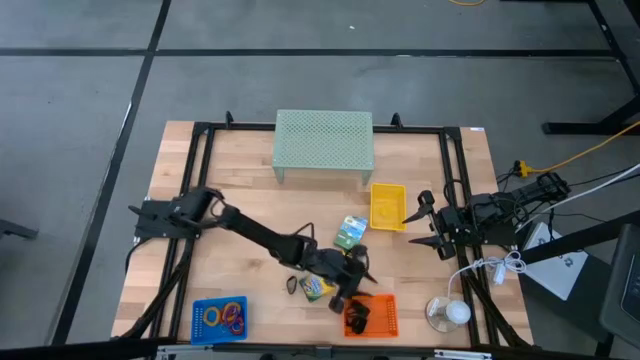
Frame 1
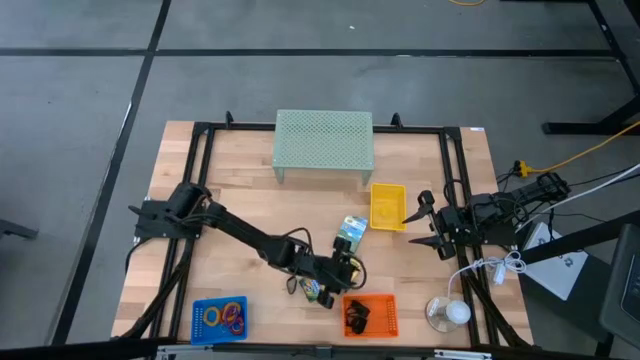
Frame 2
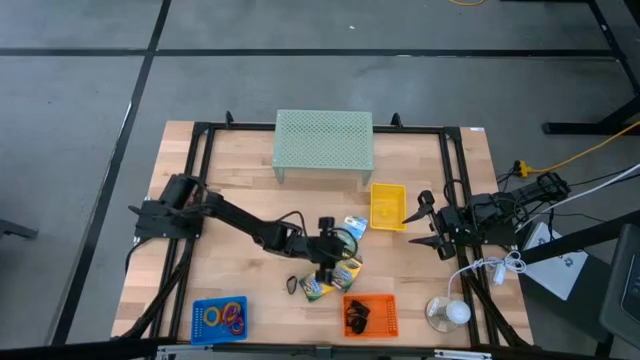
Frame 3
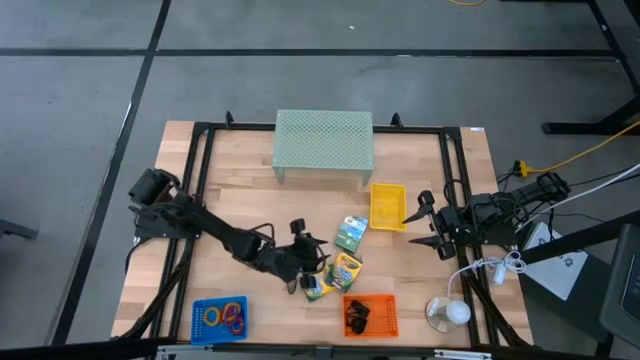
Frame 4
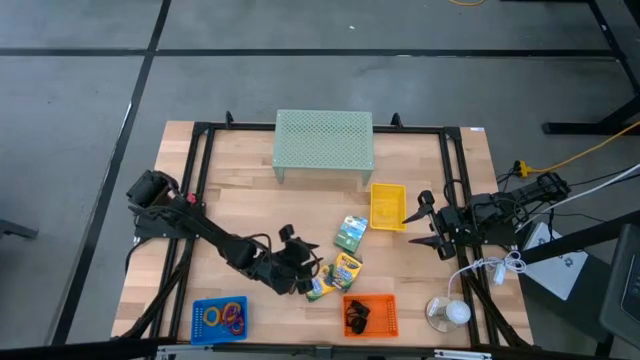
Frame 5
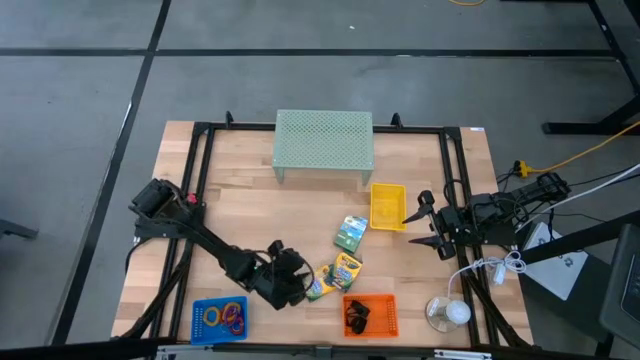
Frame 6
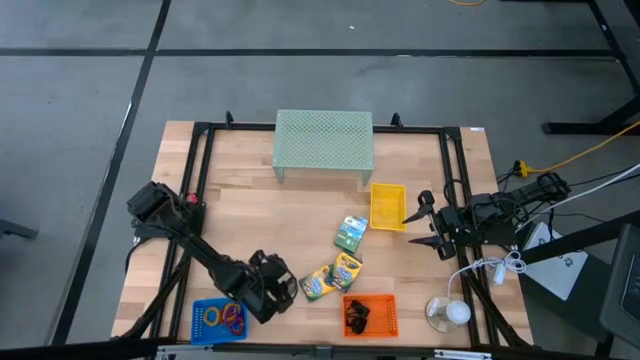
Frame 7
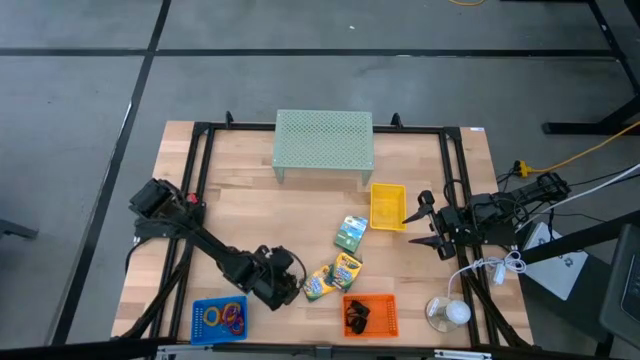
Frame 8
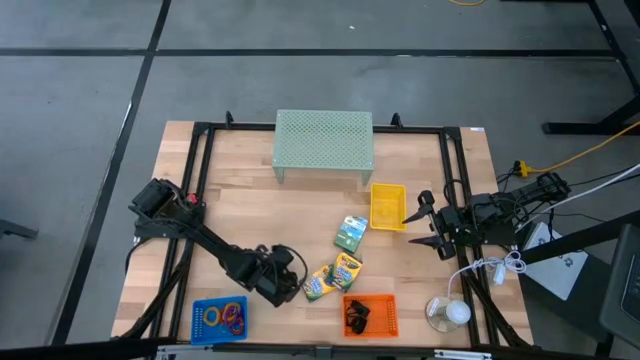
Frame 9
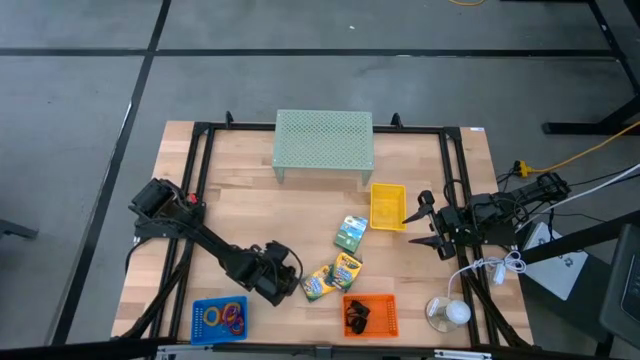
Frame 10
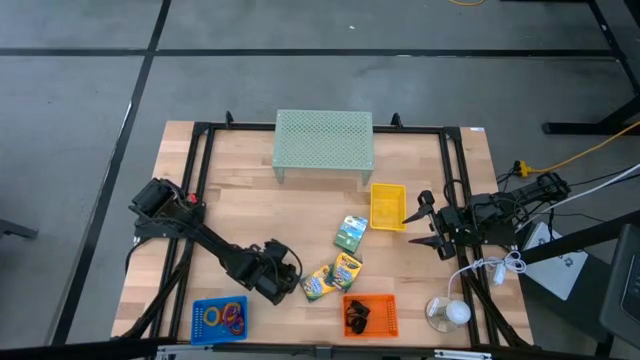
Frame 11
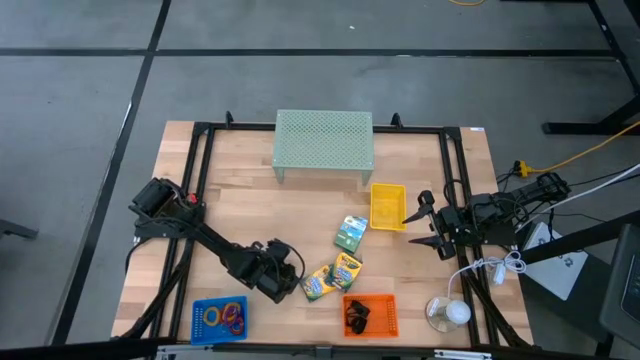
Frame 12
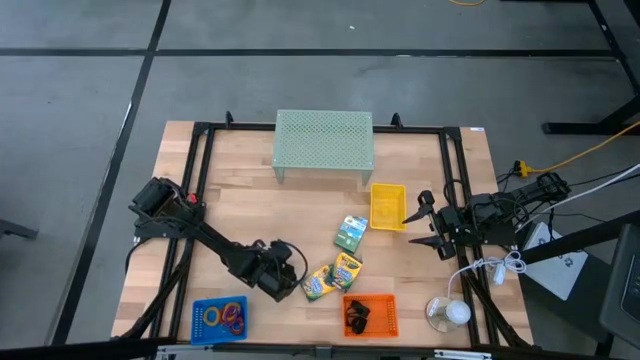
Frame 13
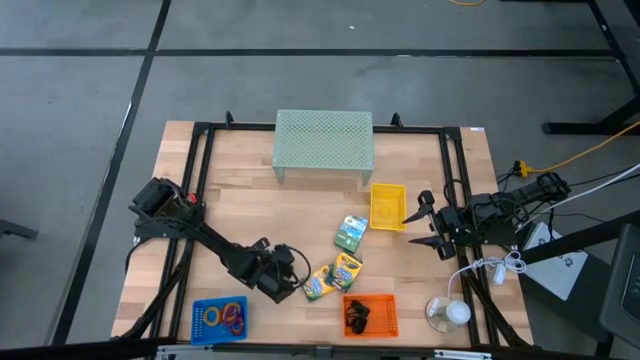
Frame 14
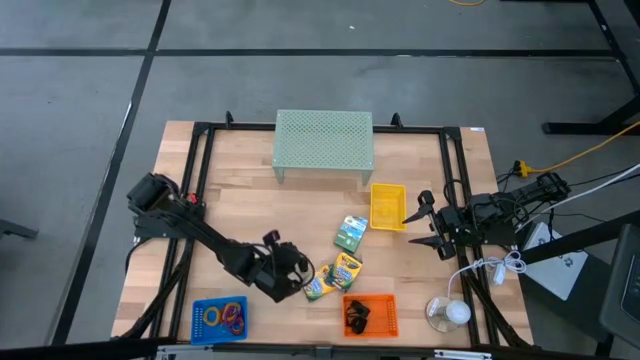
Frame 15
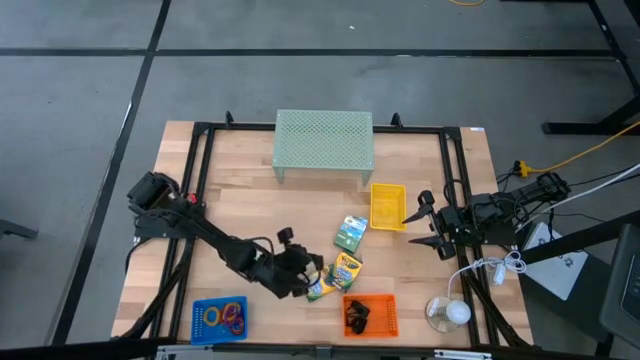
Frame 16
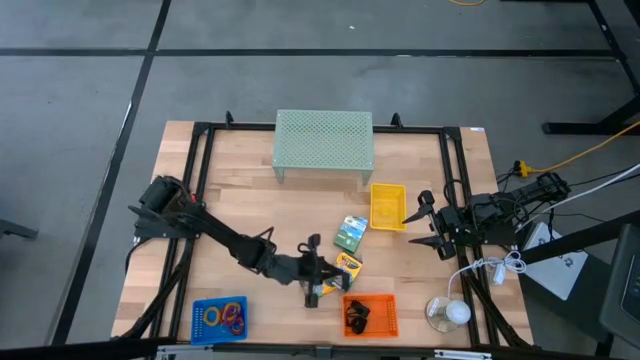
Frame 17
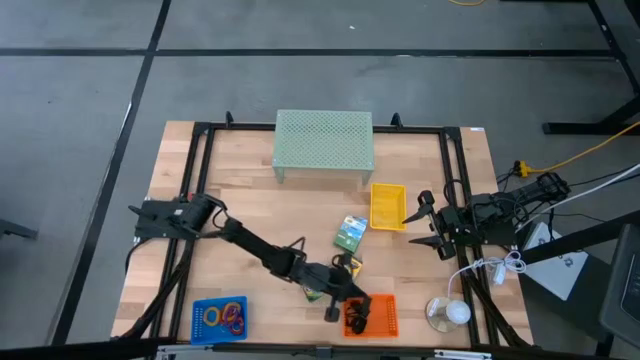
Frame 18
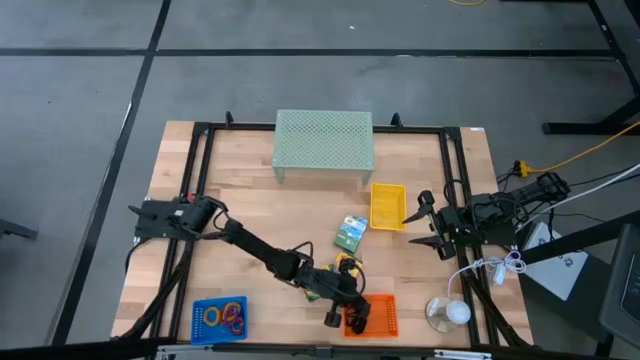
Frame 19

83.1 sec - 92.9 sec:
Task: Pick & Place Office Desk Supplies
Put the black rubber band into the orange bin

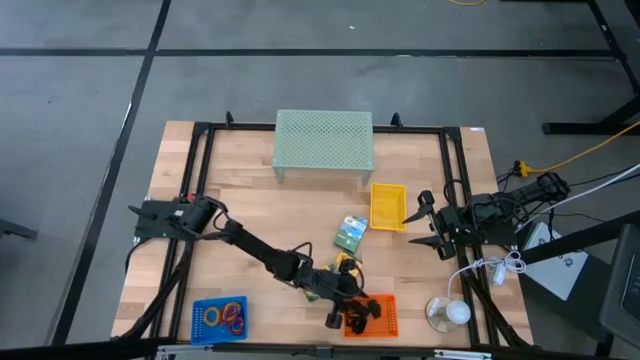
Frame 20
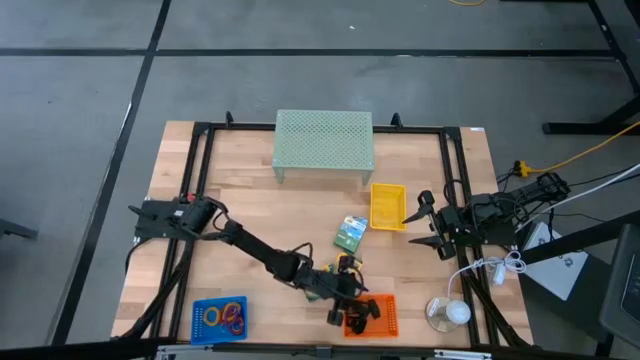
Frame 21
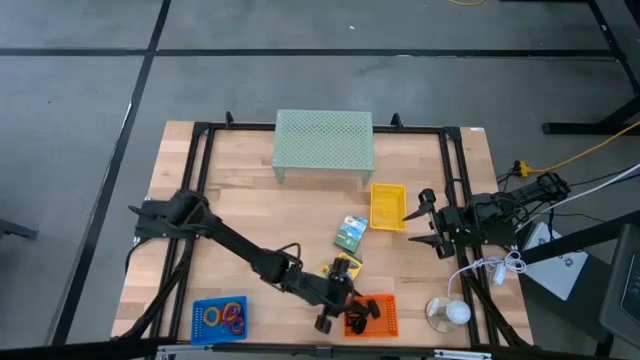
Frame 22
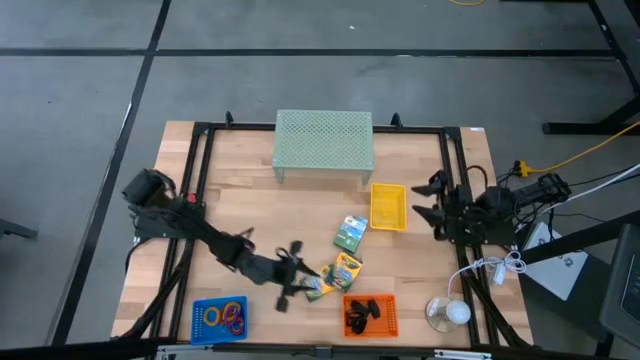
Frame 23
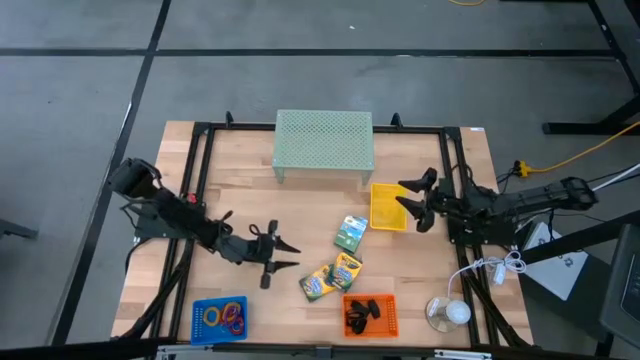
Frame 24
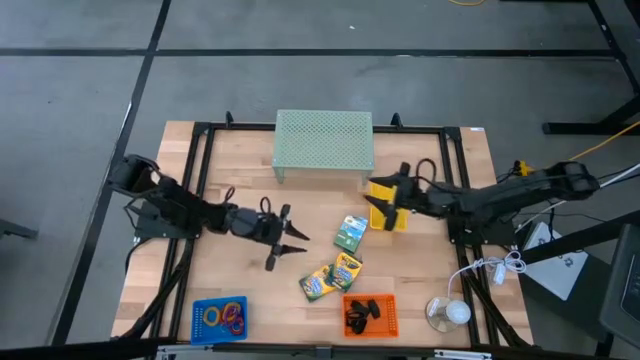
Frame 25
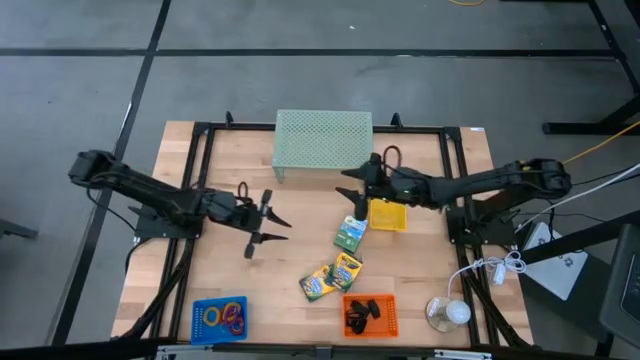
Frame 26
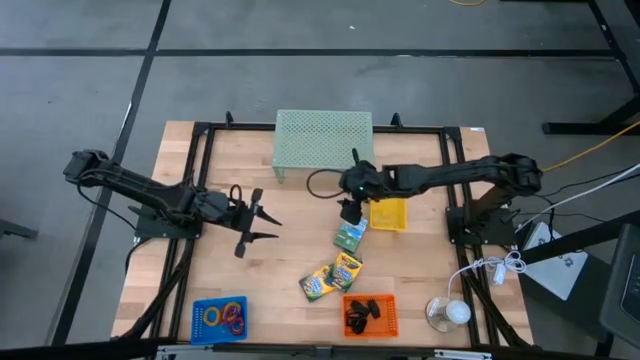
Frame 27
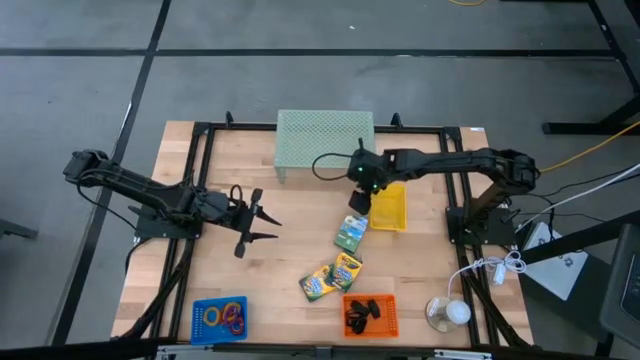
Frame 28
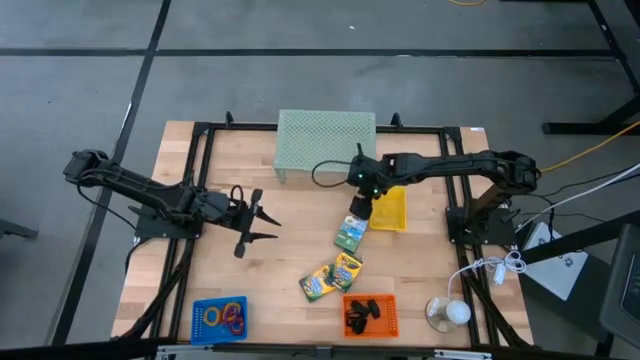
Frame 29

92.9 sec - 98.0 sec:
Put the box of crayons into the yellow bin

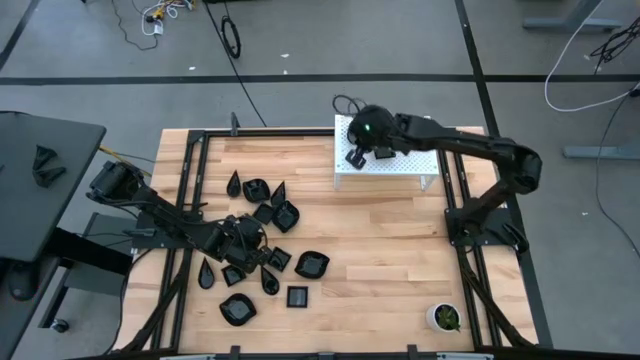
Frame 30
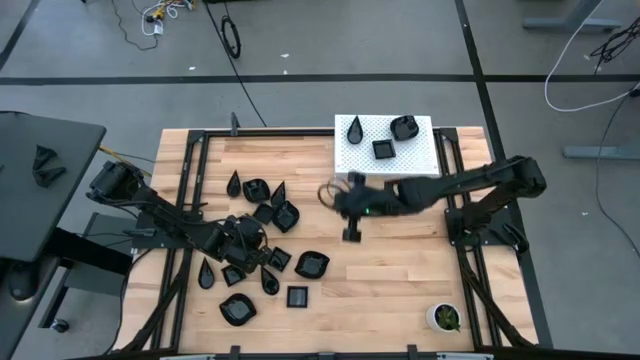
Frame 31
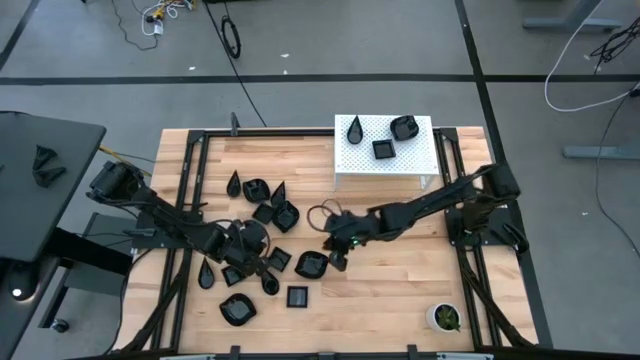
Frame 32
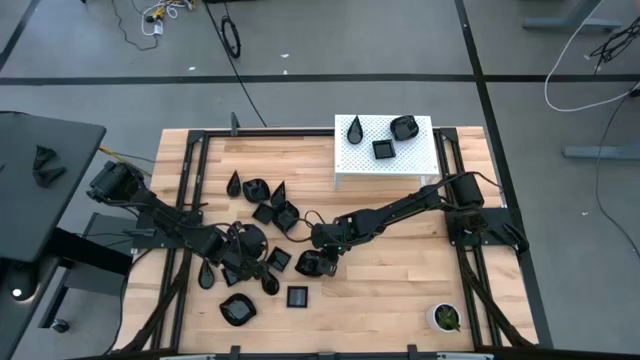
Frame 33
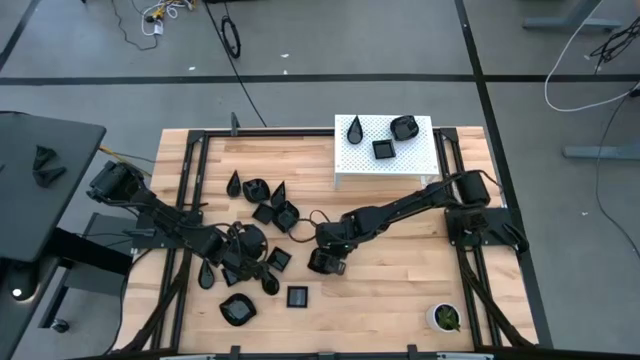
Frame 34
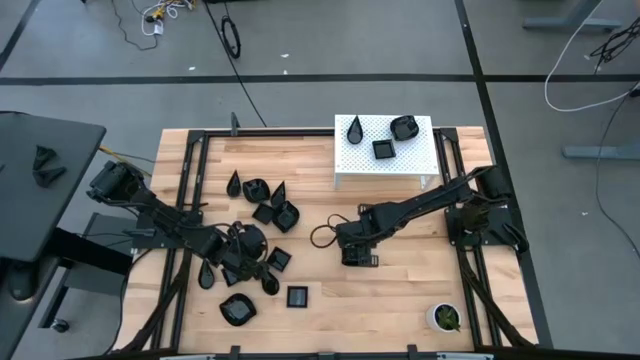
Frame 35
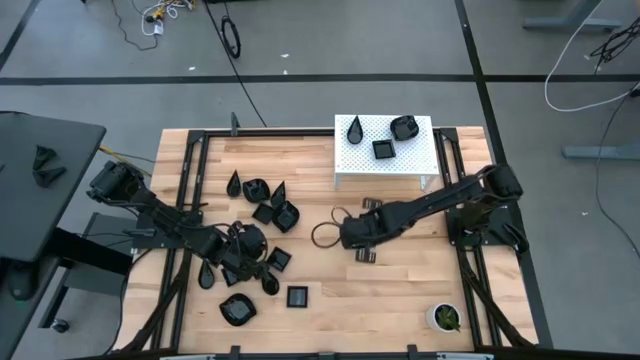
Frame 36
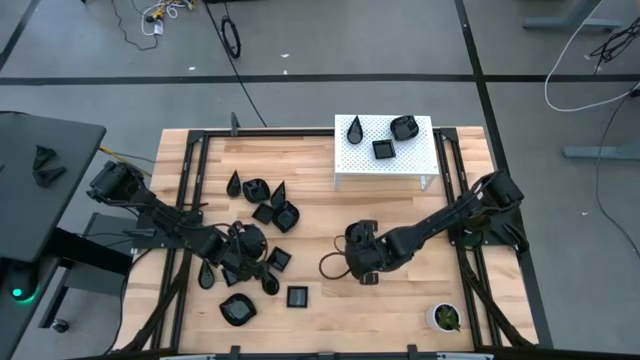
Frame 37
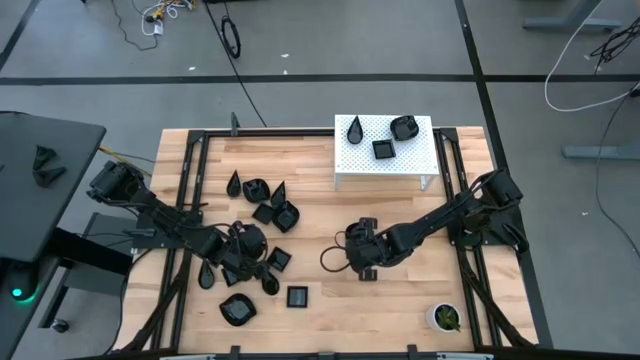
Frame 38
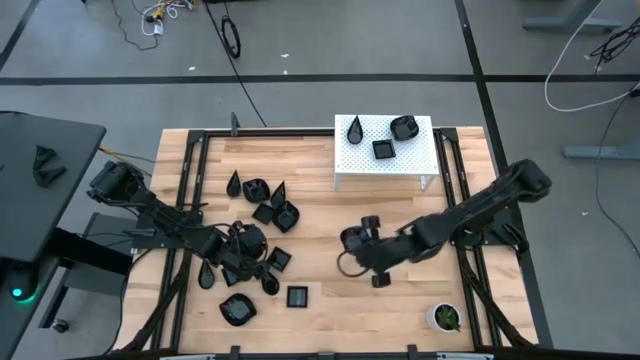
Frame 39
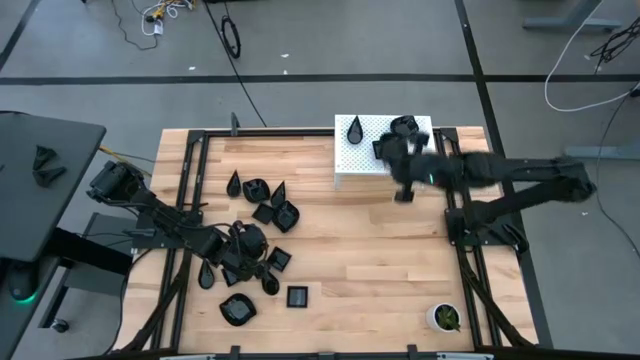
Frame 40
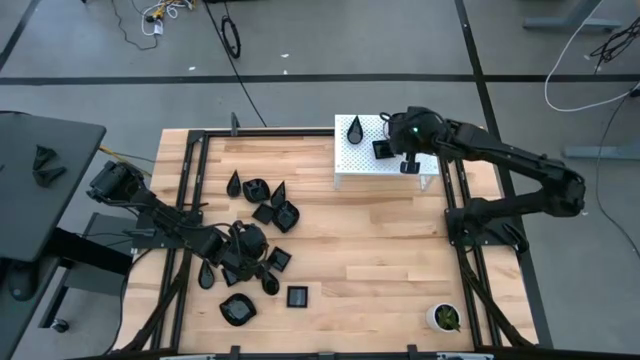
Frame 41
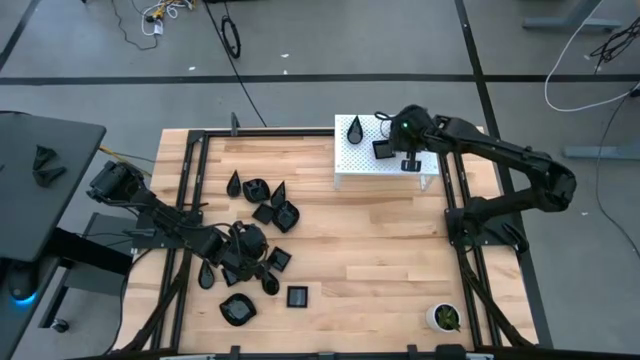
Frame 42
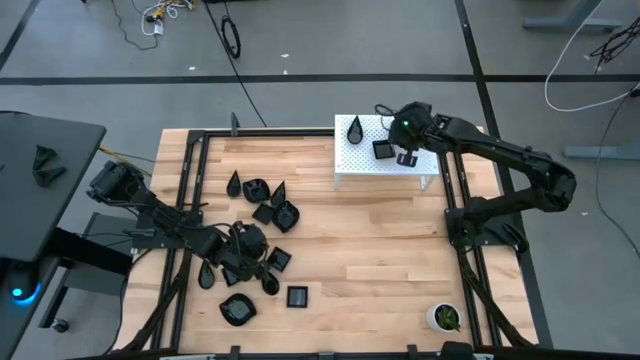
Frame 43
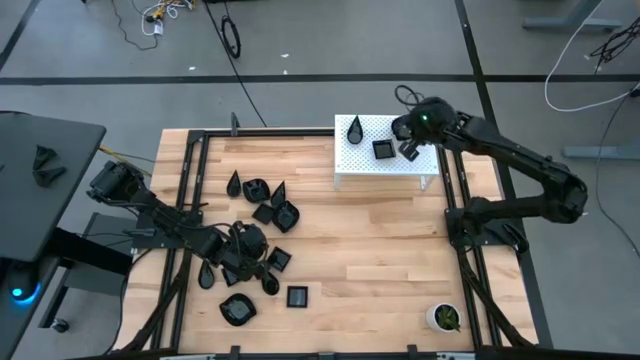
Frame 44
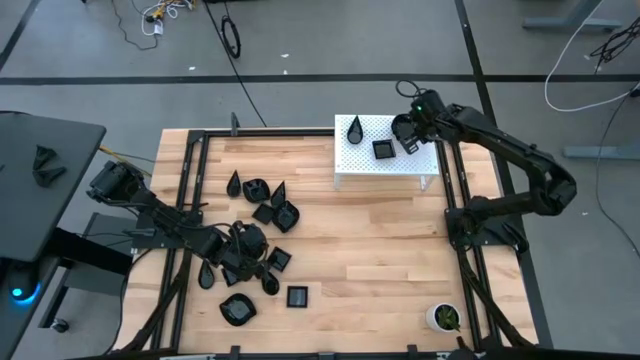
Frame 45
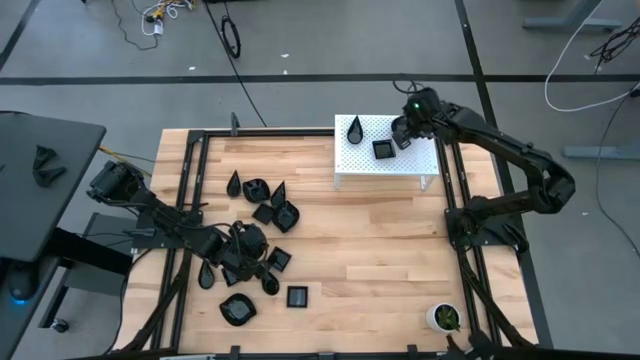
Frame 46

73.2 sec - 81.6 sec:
Task: Pick & Place Mini shaped plates
Stack the black leaf shaped plate on the black leaf shaped plate on the shelf
